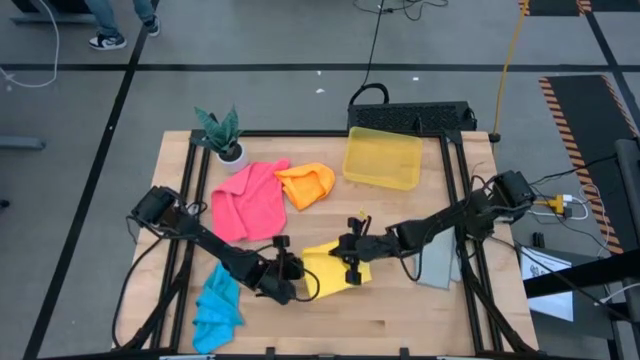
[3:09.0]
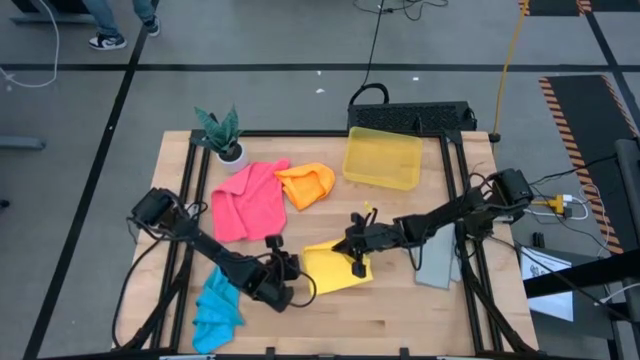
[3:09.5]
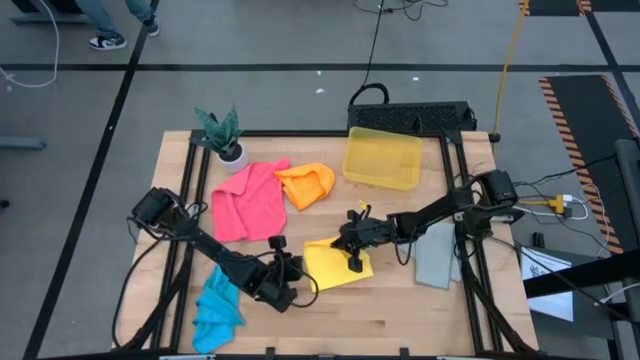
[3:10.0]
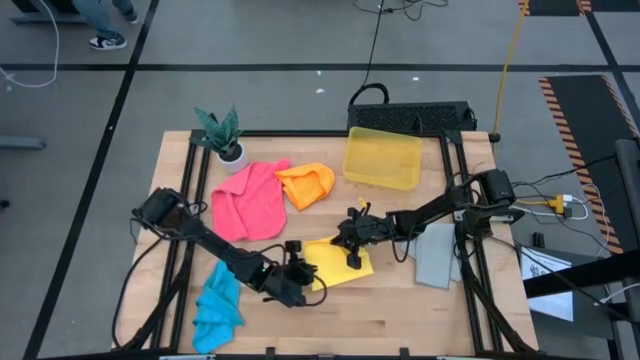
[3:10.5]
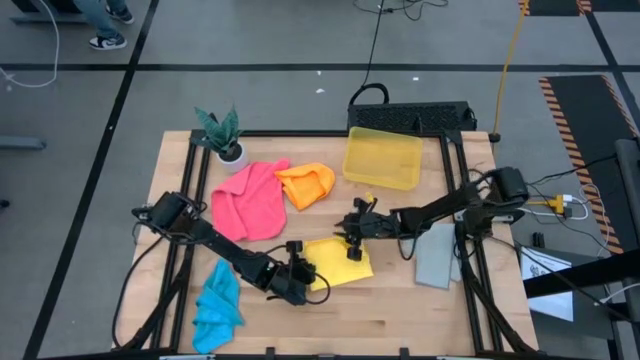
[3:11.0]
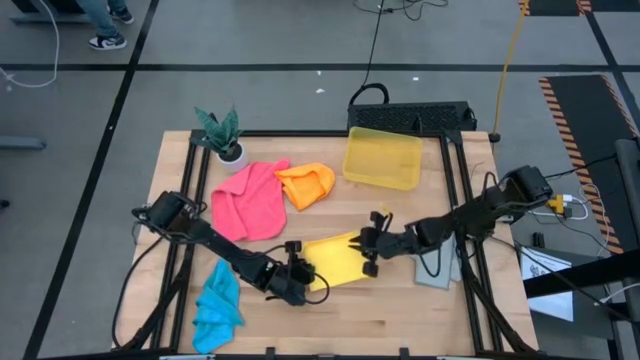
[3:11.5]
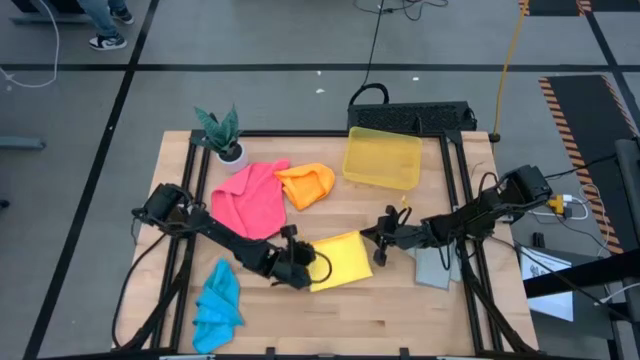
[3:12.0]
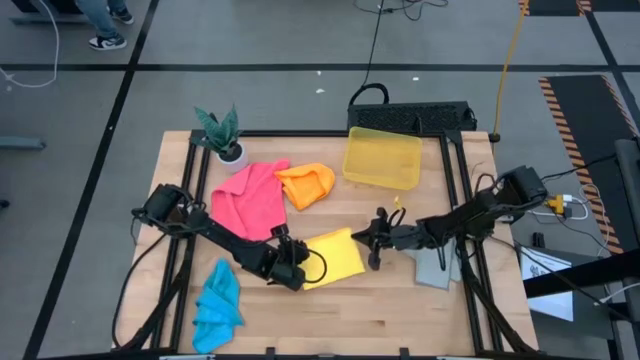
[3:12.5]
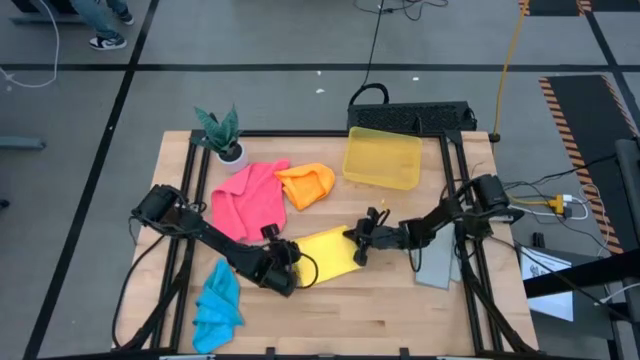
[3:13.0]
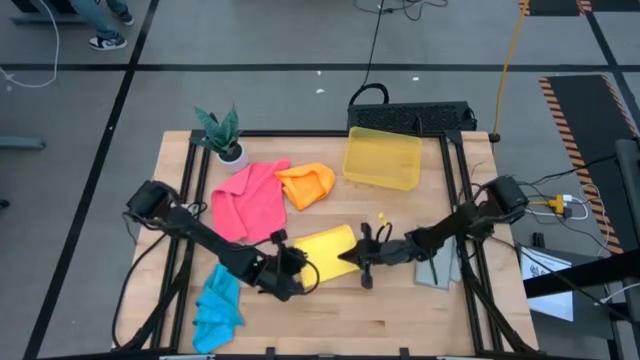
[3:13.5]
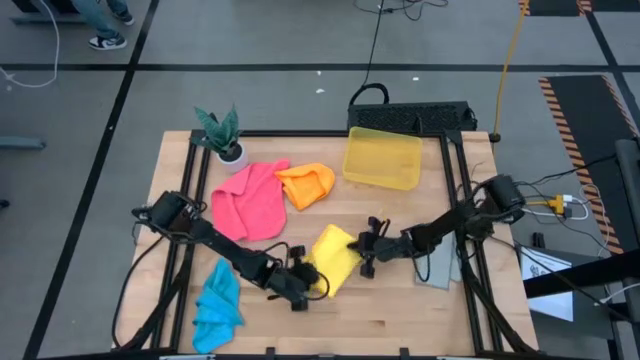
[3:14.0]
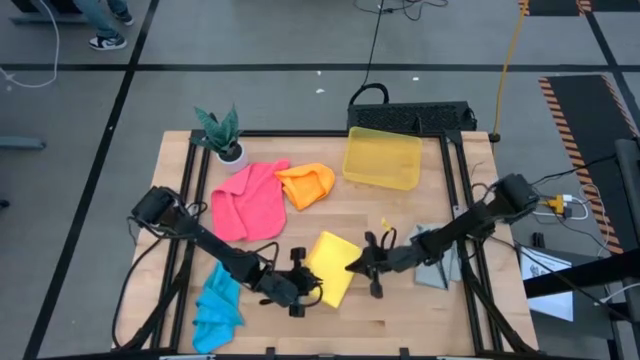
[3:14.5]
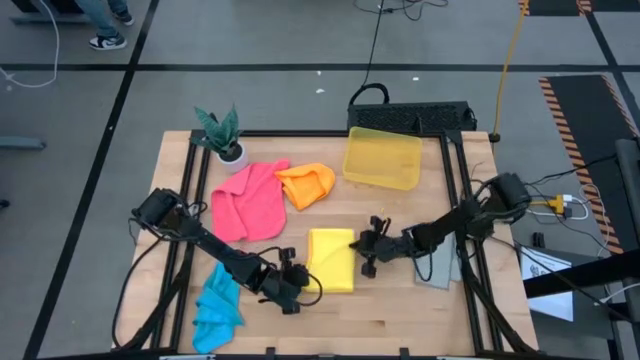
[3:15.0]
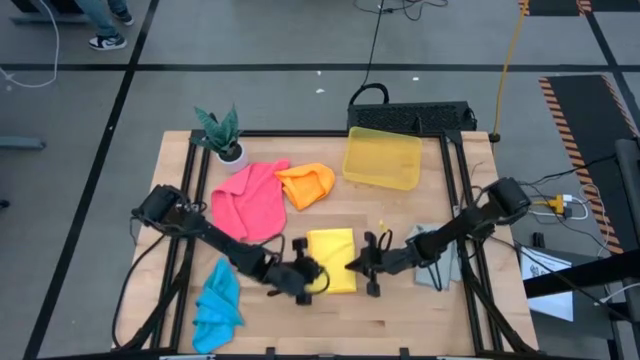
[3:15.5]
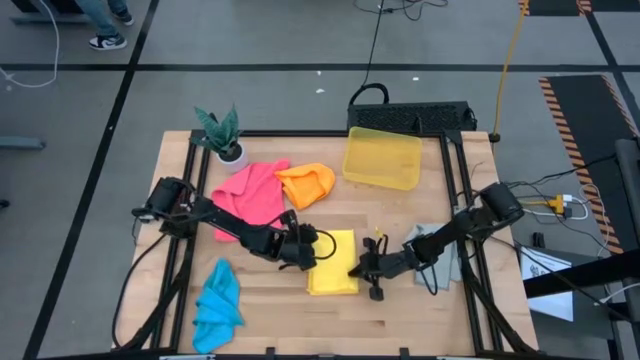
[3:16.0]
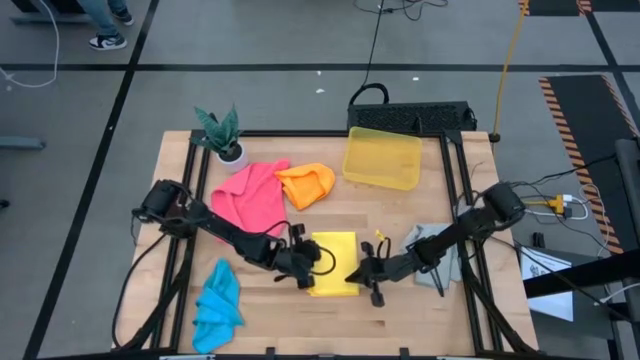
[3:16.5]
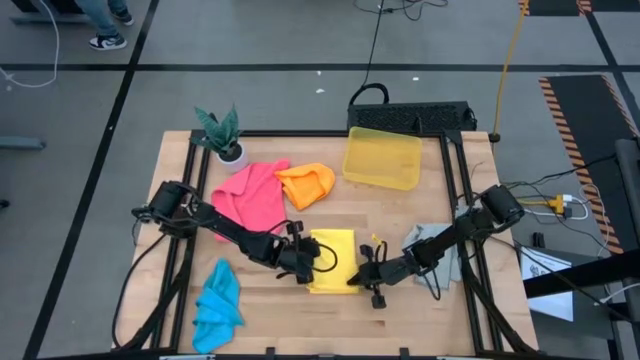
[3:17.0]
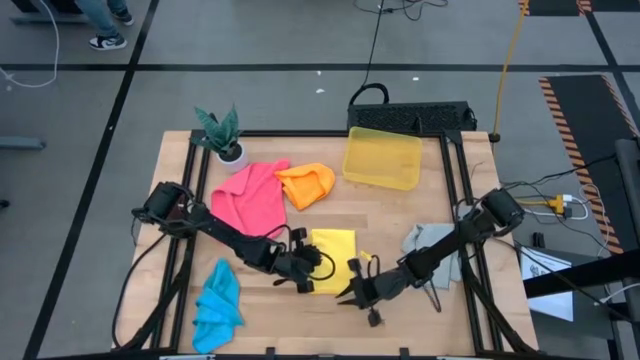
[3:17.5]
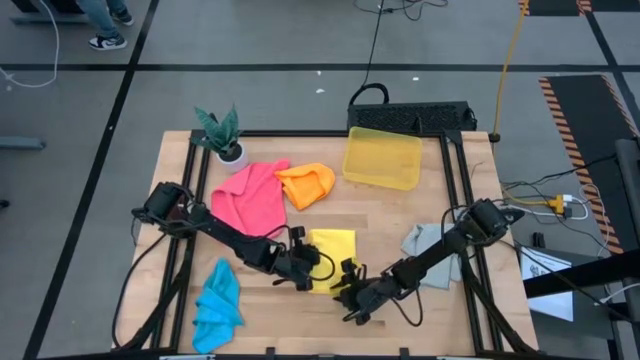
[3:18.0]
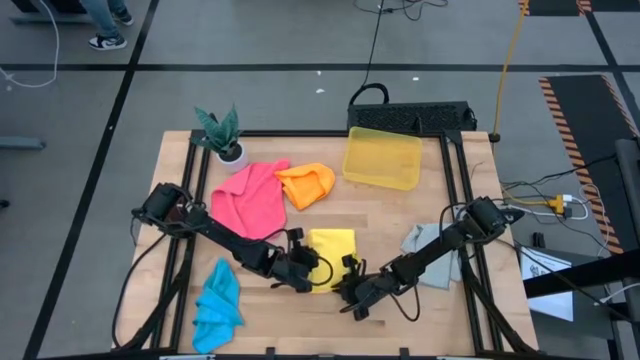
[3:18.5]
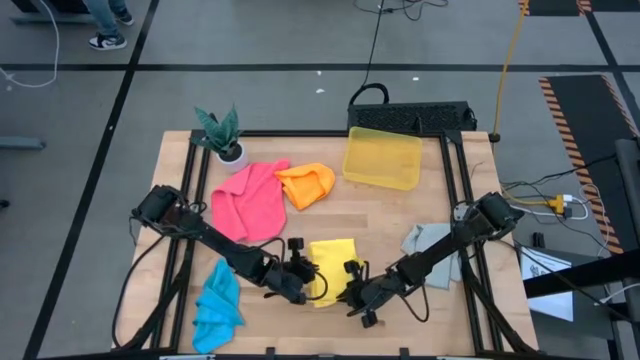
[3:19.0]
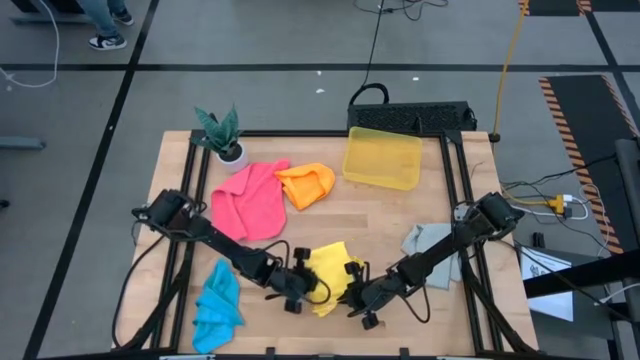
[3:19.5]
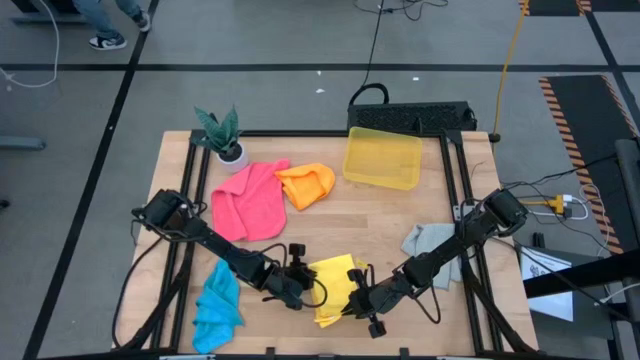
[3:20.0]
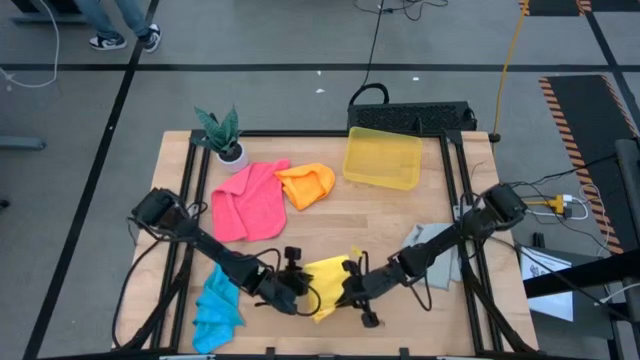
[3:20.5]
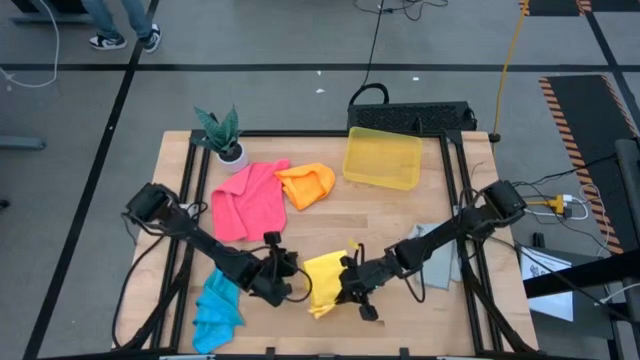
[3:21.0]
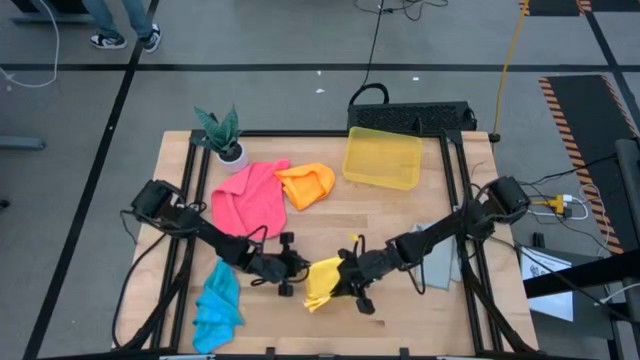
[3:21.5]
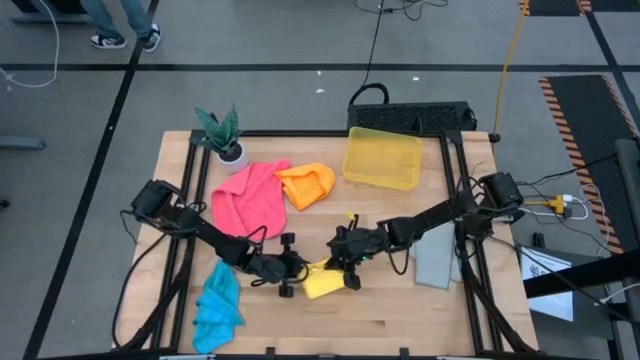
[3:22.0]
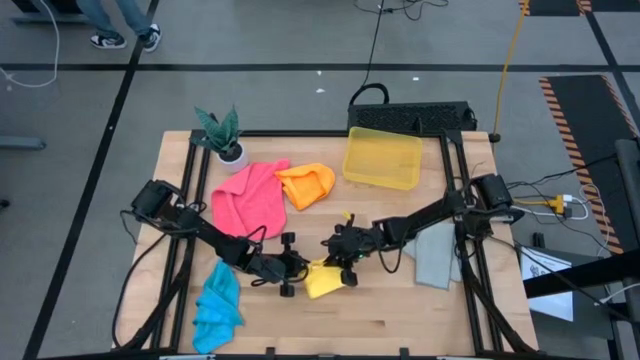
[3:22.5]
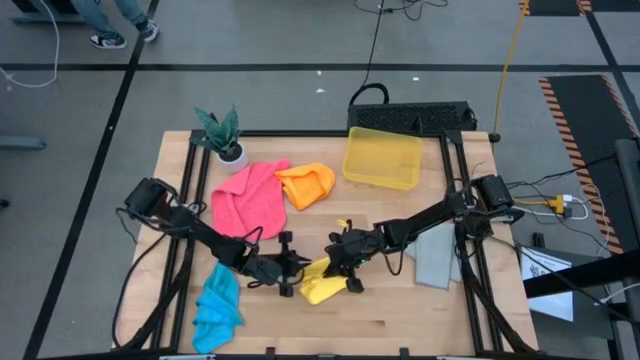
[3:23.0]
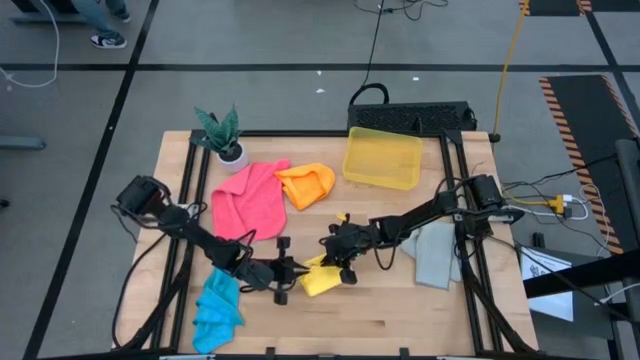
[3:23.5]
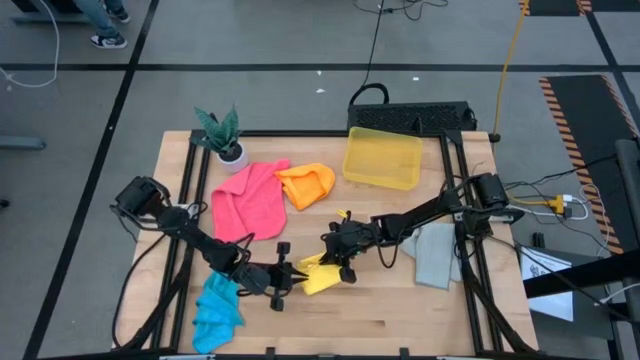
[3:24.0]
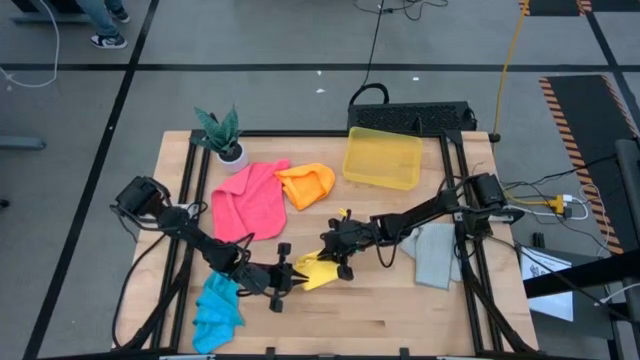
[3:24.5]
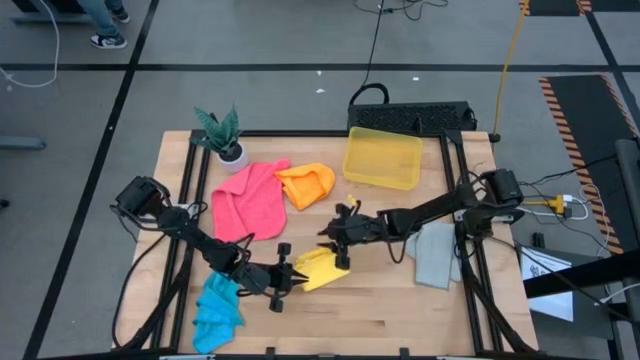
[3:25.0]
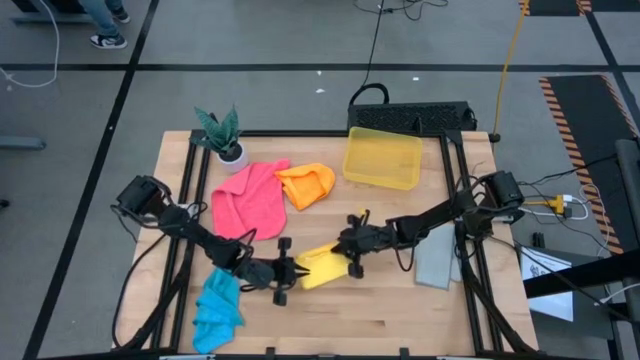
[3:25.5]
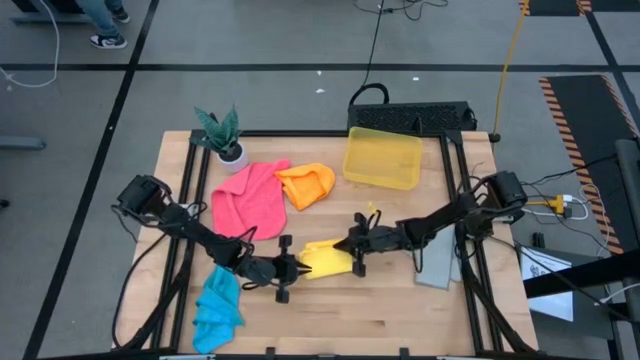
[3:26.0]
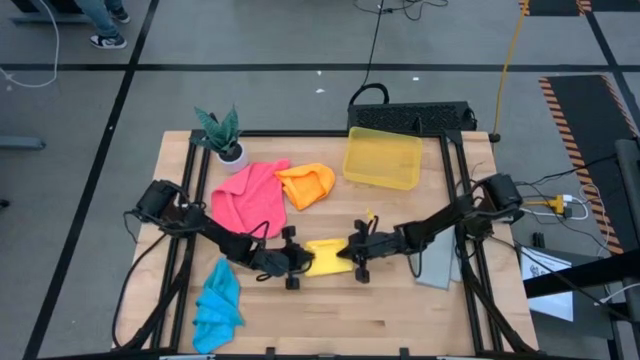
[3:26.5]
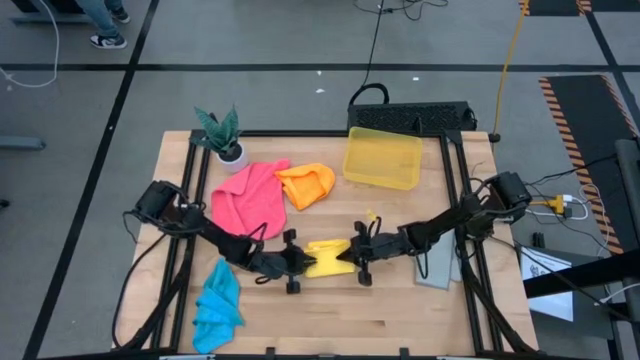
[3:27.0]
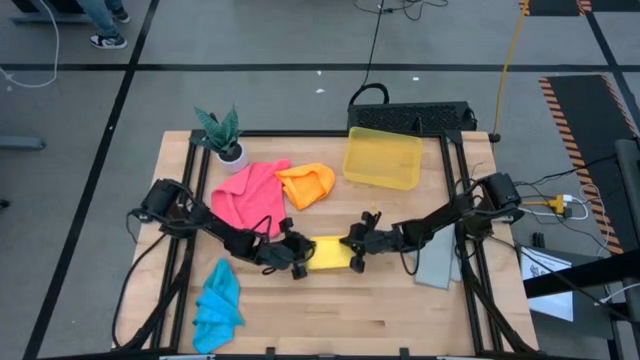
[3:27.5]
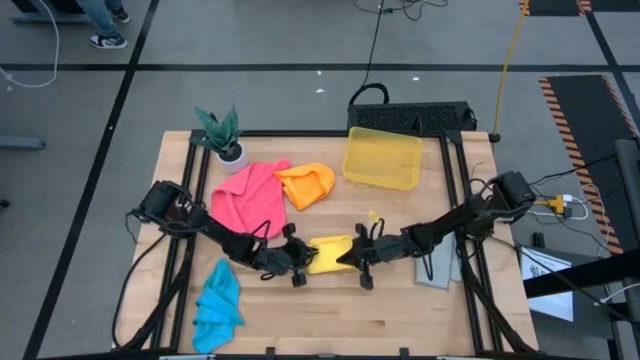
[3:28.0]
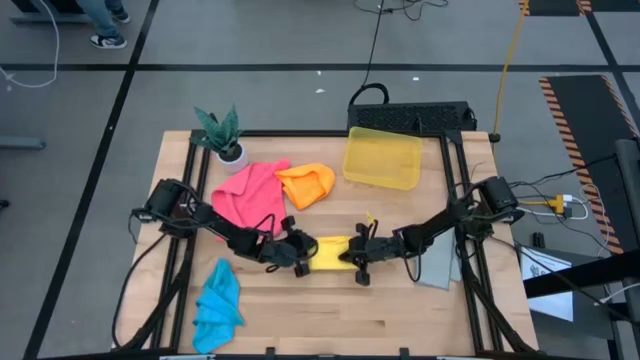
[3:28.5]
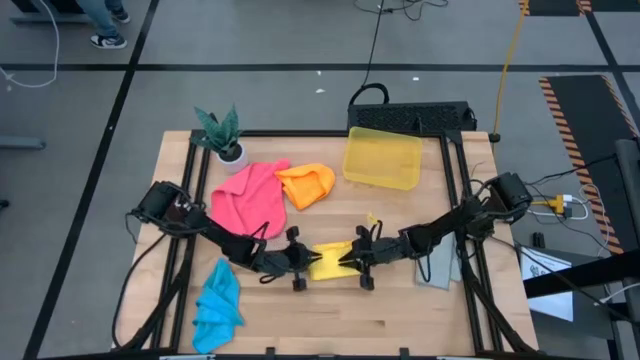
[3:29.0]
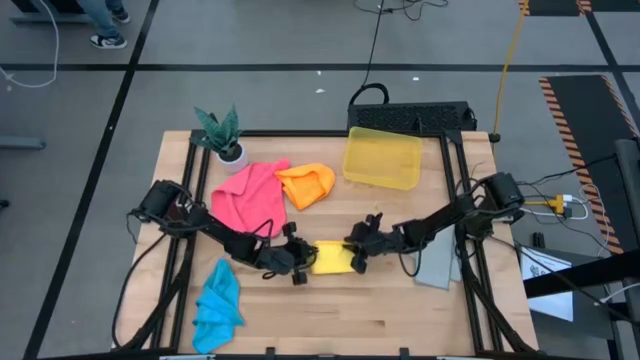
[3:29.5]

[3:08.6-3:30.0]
Task: Fold microfiber towels
Fold the yellow kitchen towel
